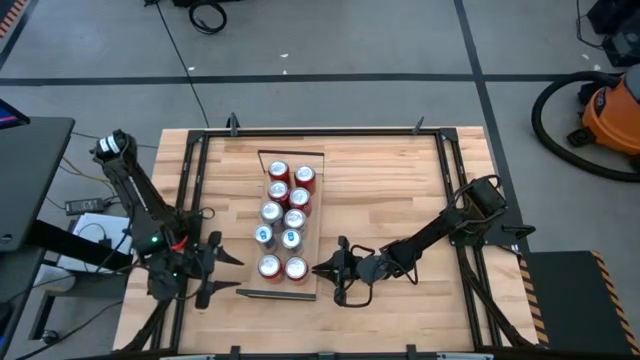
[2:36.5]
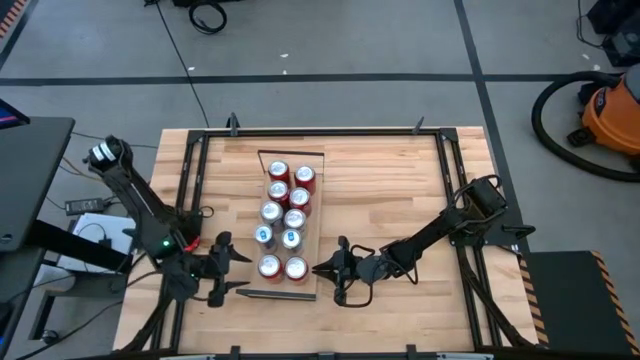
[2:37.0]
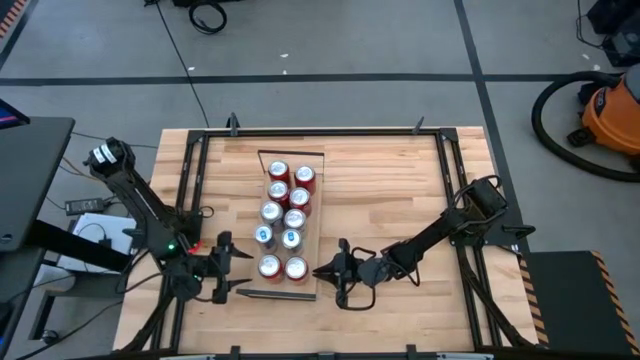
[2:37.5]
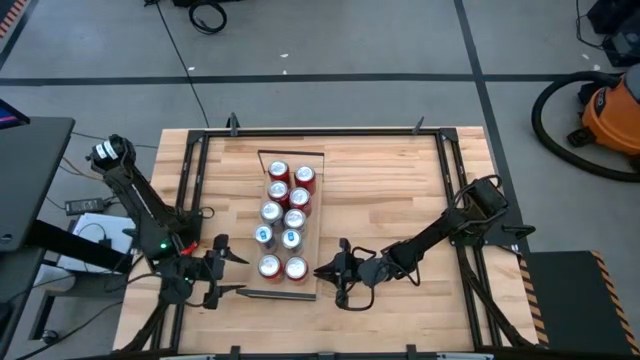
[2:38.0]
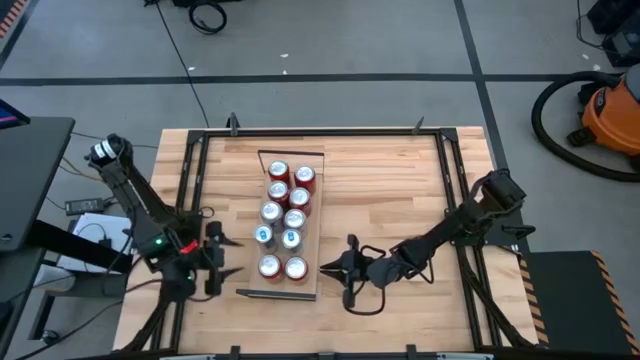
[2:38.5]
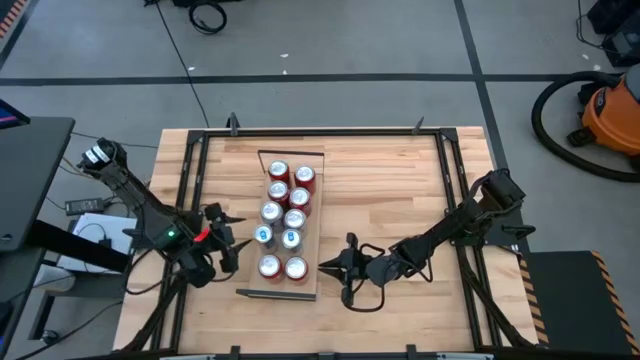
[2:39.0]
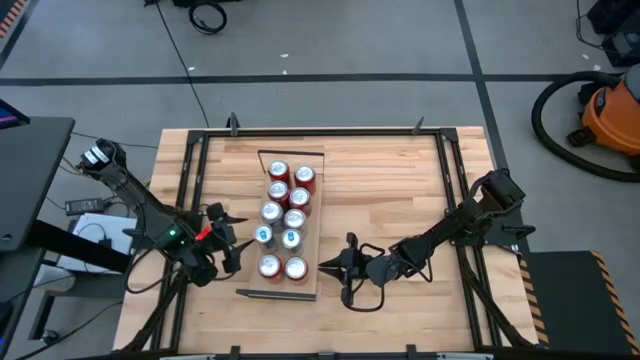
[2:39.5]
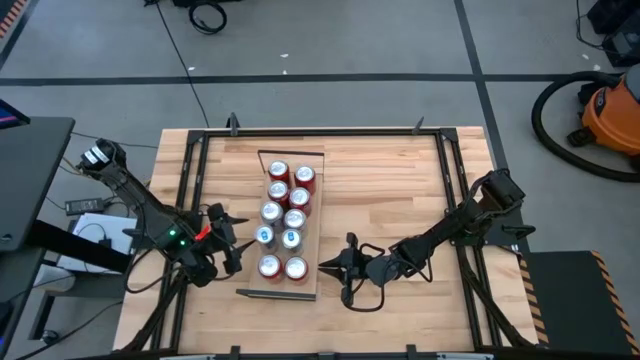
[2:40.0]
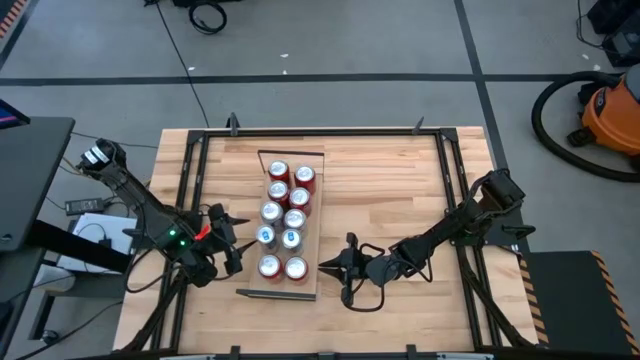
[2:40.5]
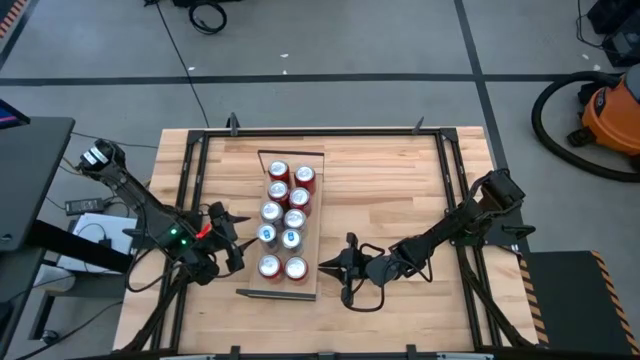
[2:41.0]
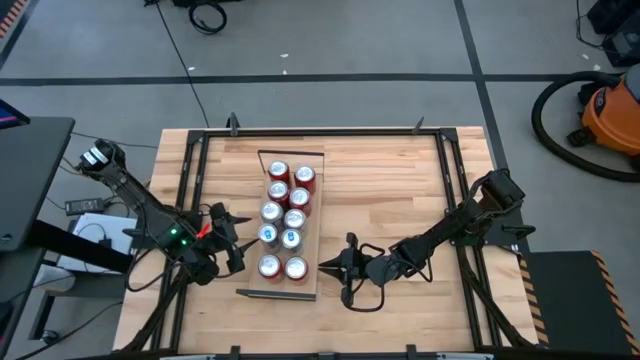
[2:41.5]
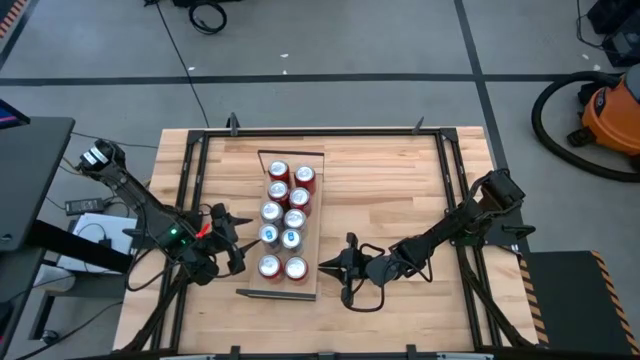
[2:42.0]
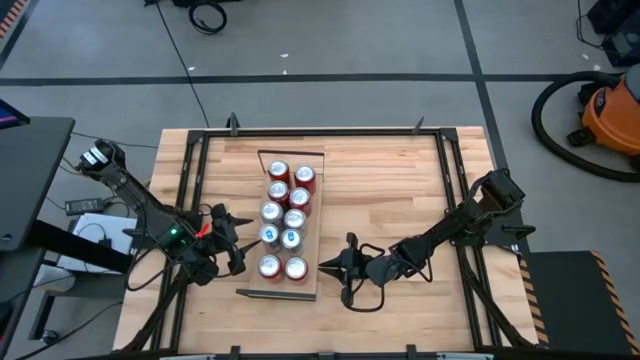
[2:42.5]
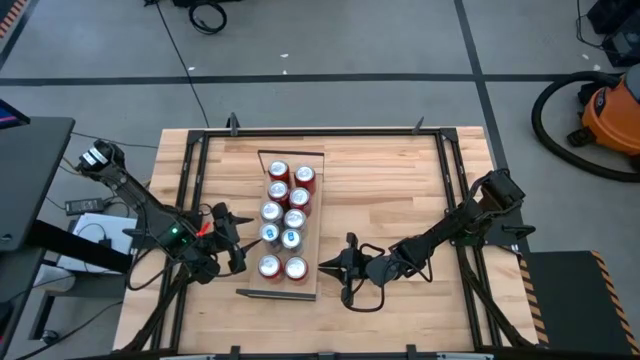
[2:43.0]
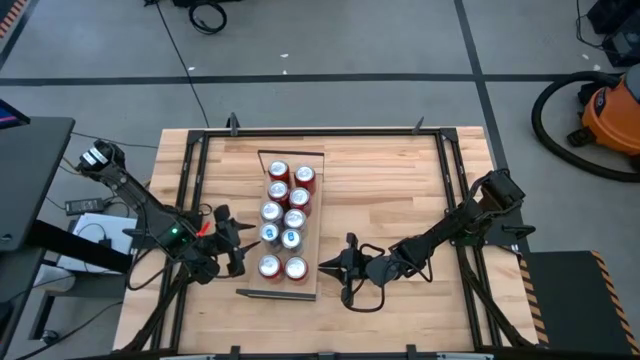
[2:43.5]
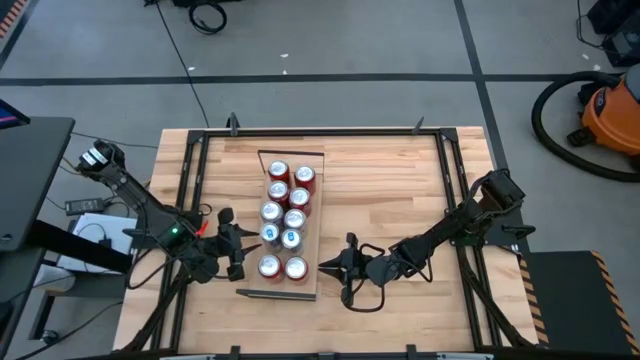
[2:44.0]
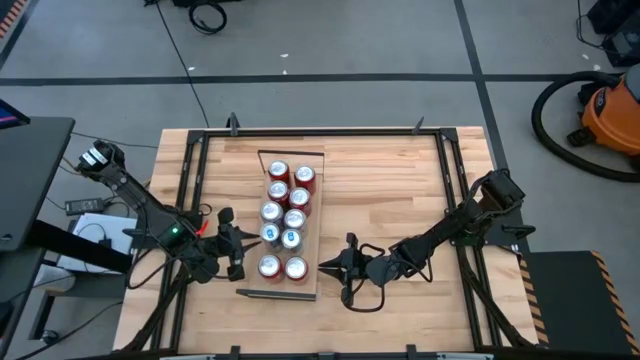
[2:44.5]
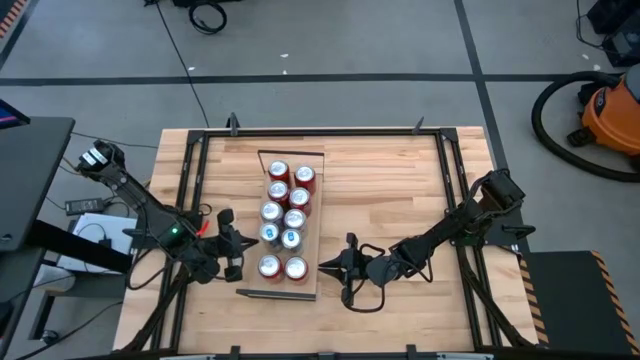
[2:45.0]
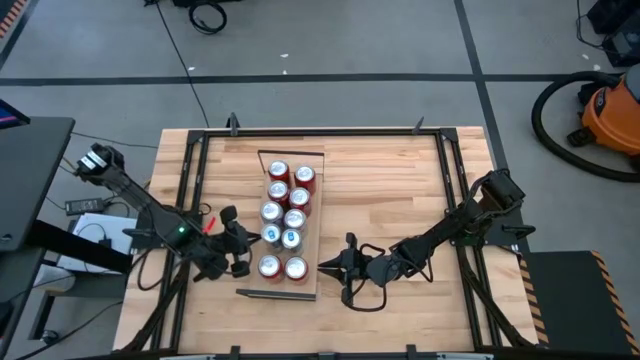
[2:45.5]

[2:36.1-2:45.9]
Task: Place canned beverage on shelf
Adjust the blue soda can on the shelf

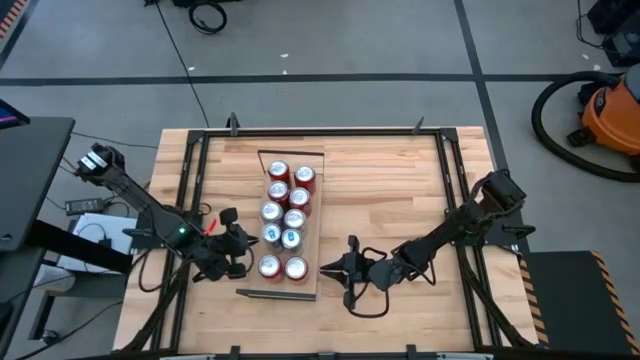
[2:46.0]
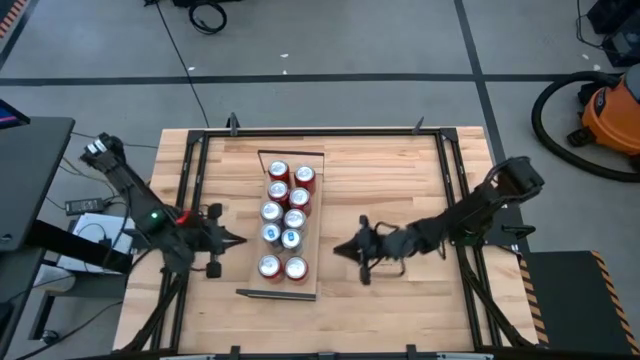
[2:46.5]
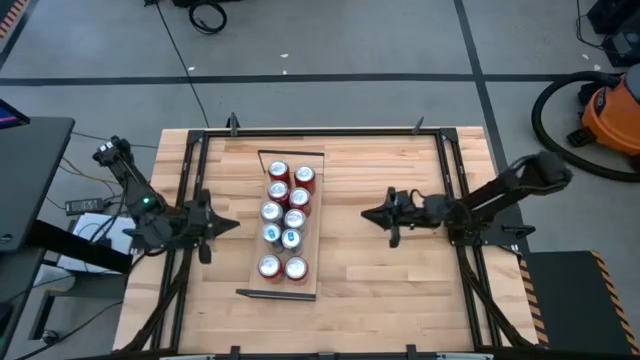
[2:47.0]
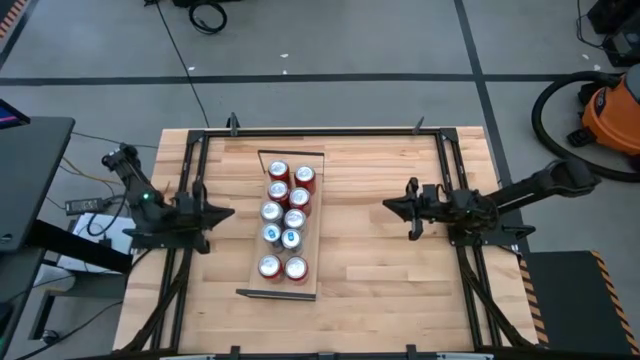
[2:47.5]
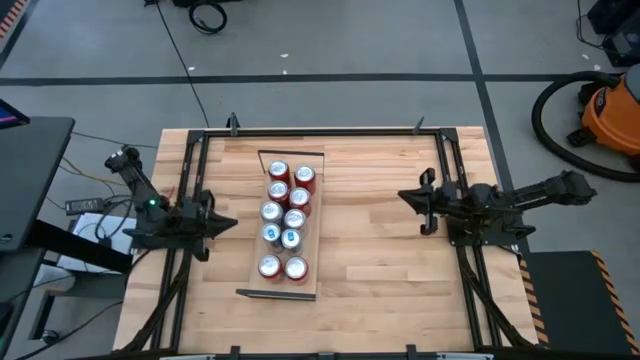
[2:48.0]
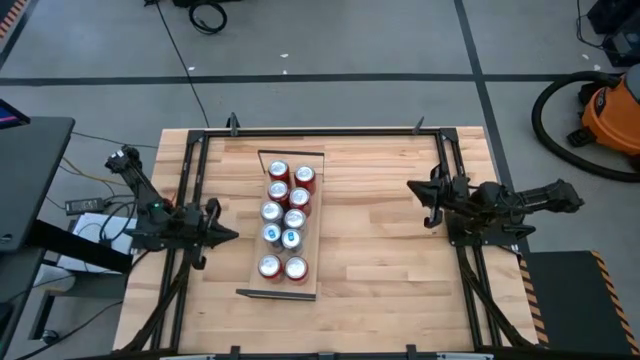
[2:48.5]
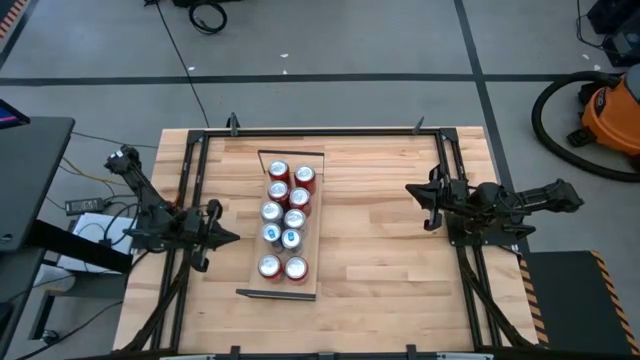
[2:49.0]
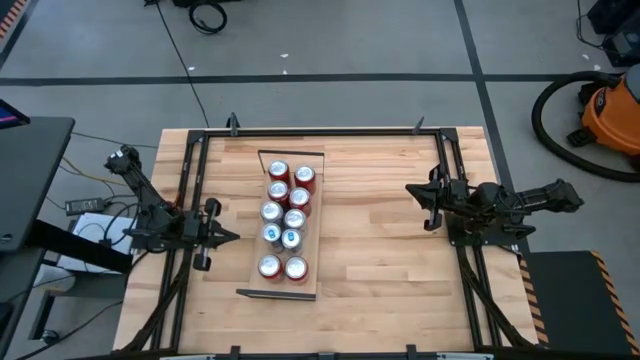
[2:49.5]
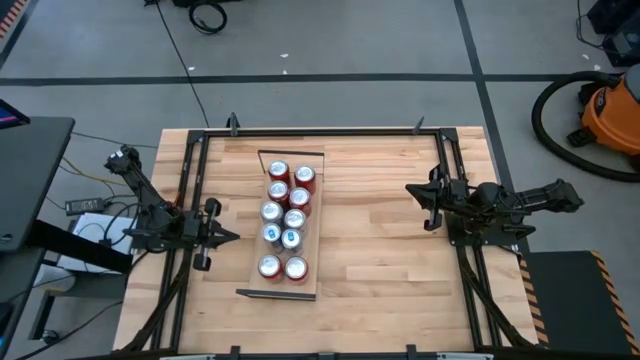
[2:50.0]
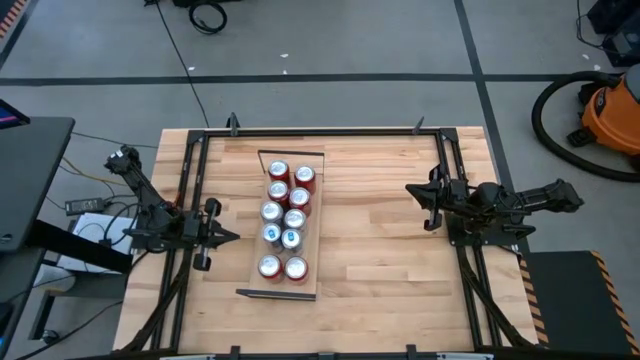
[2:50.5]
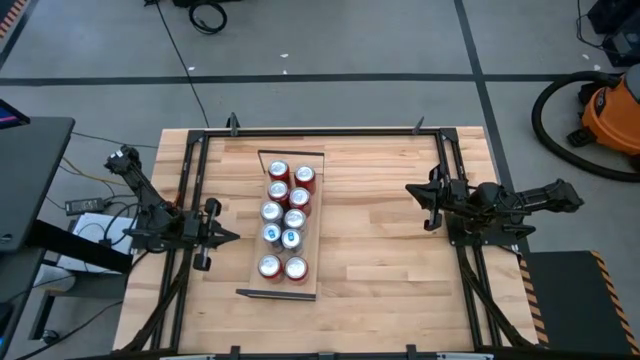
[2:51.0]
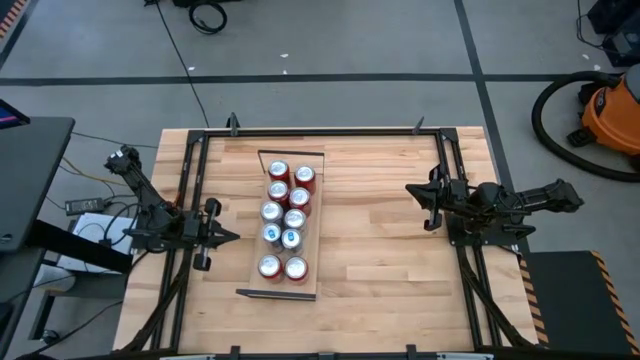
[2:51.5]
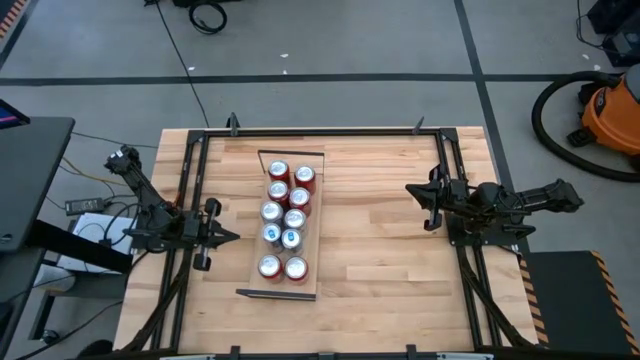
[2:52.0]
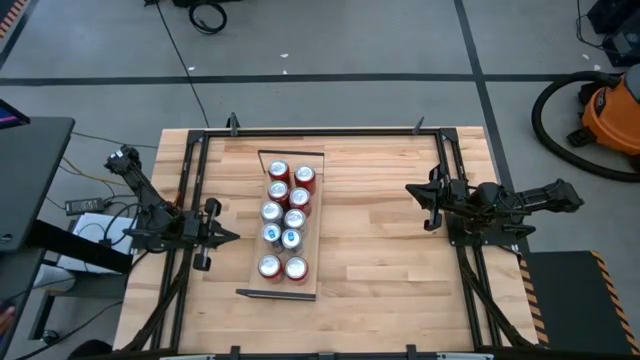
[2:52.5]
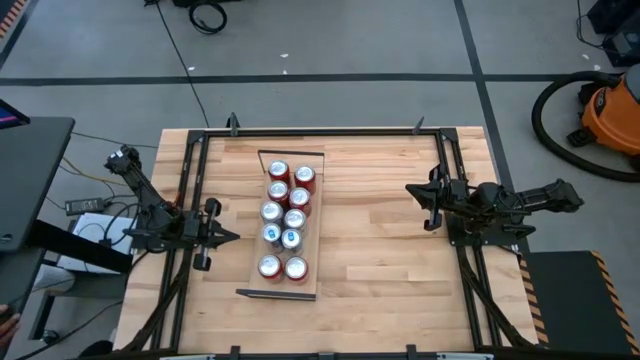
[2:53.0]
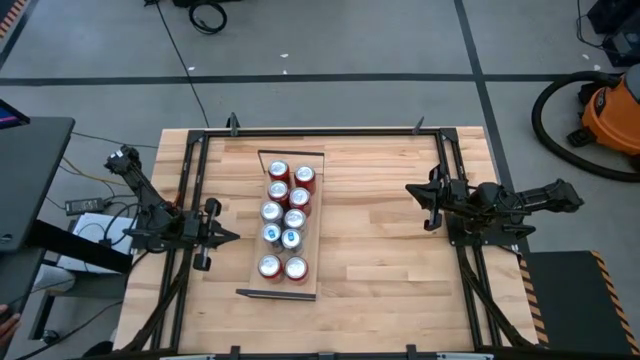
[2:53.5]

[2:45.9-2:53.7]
Return to Home Position

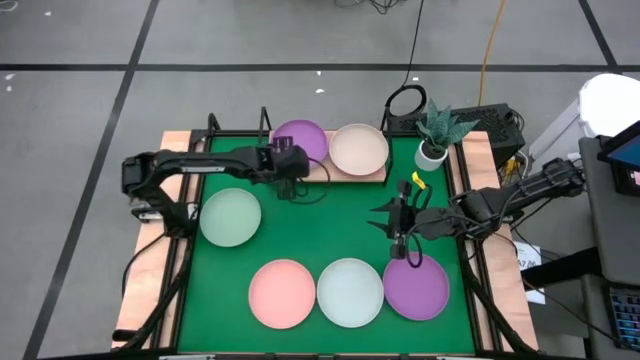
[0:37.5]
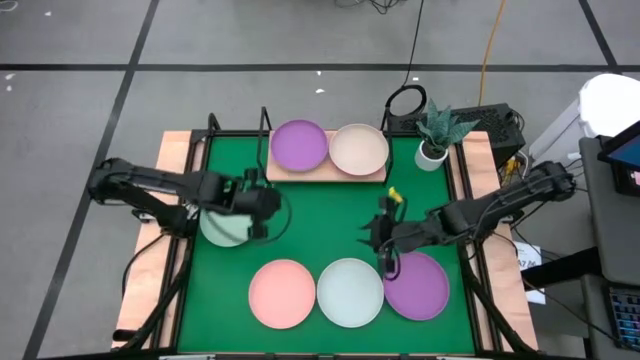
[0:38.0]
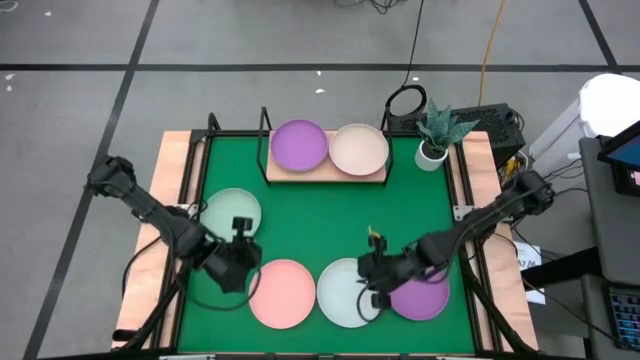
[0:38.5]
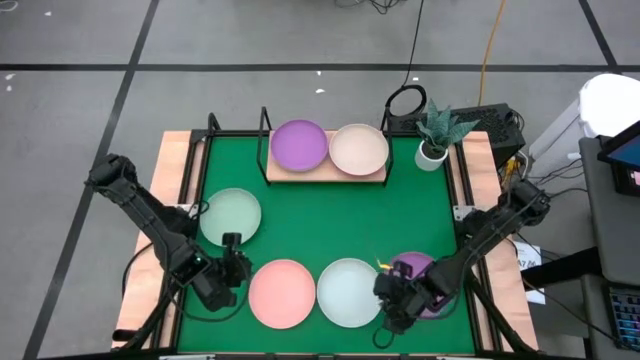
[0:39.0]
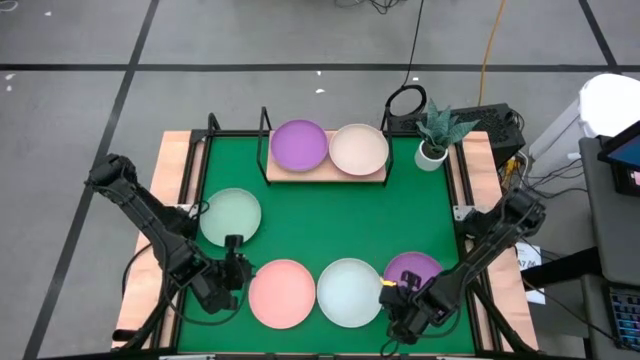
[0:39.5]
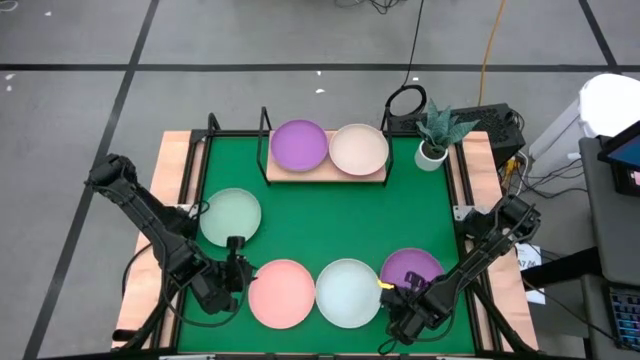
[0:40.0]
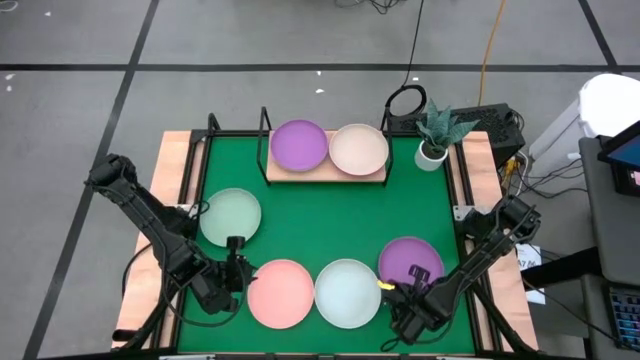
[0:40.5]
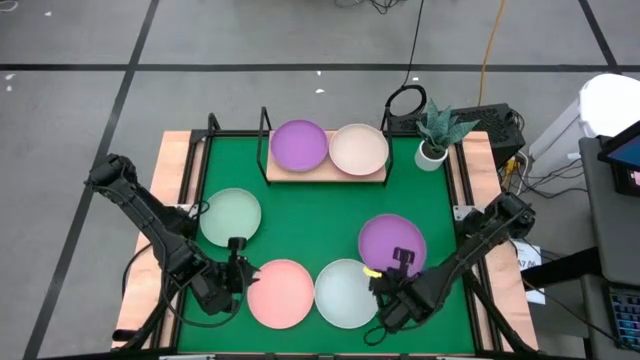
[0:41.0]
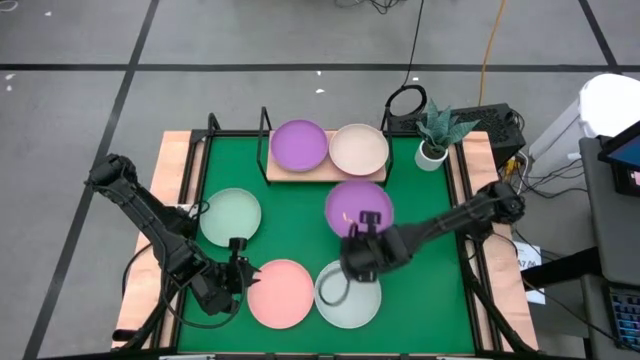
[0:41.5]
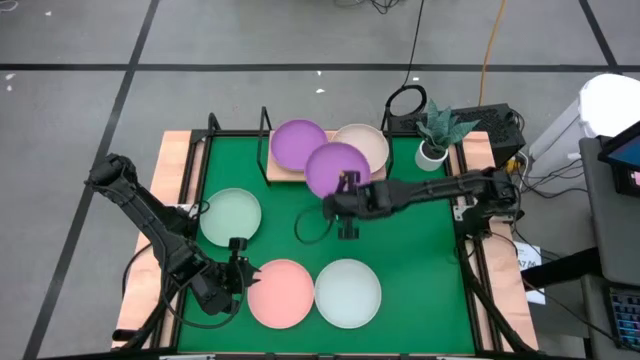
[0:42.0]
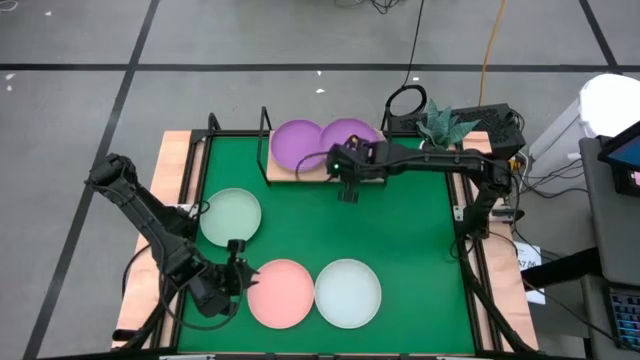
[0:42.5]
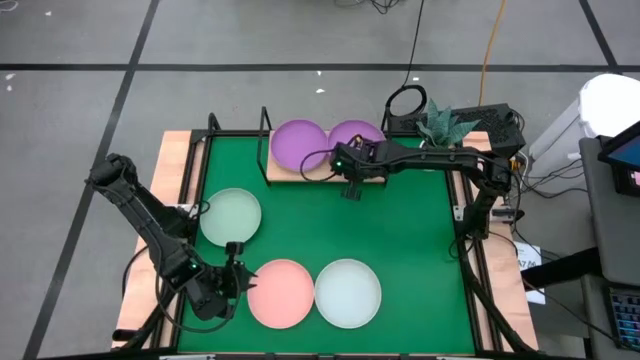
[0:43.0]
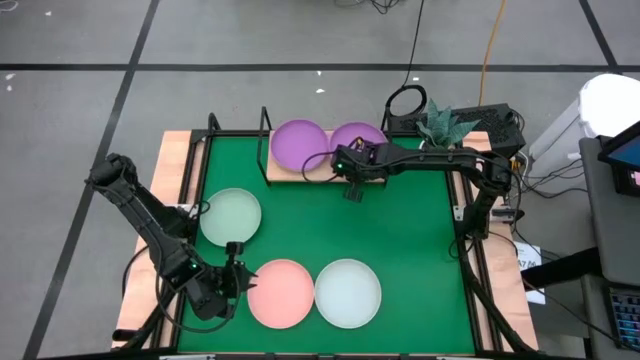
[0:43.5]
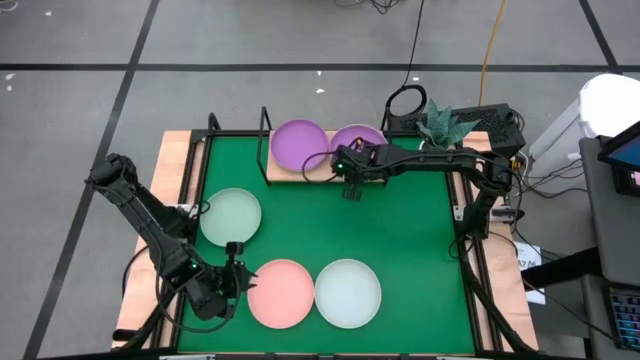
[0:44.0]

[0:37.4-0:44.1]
Task: Place and stack plates onto a shelf
Stack the purple plate on top of the light brown plate on the shelf
